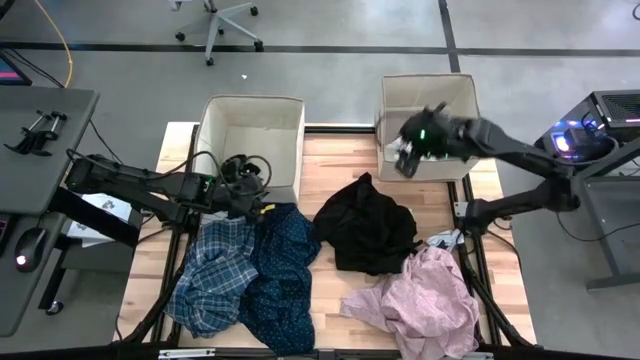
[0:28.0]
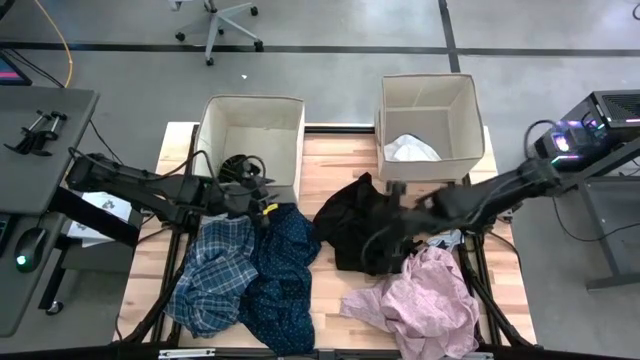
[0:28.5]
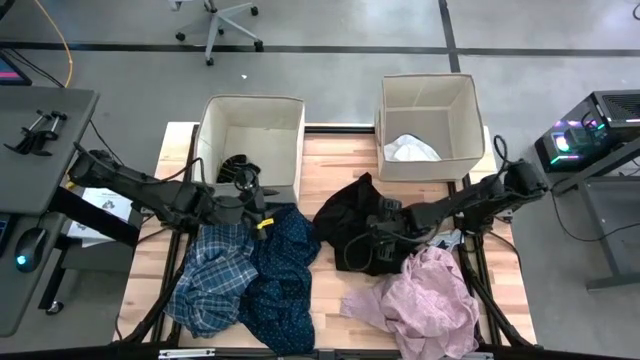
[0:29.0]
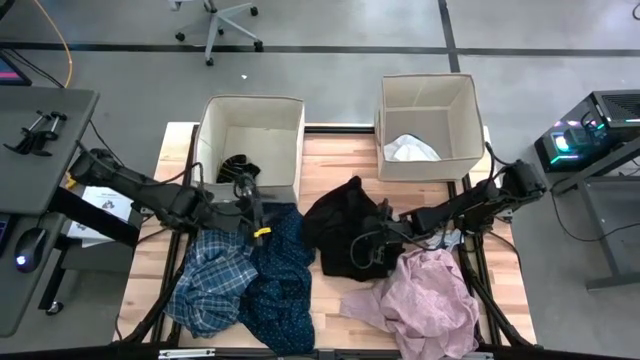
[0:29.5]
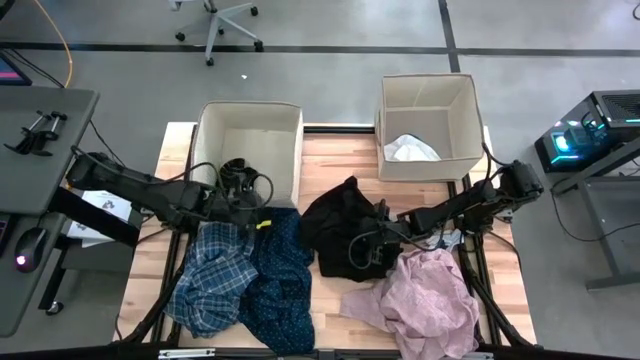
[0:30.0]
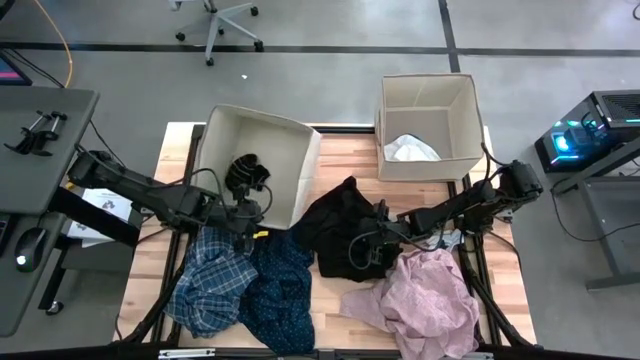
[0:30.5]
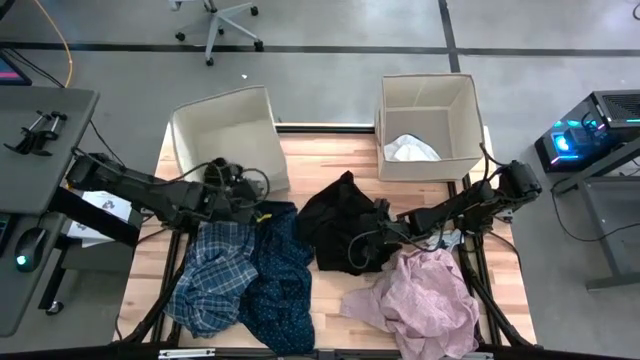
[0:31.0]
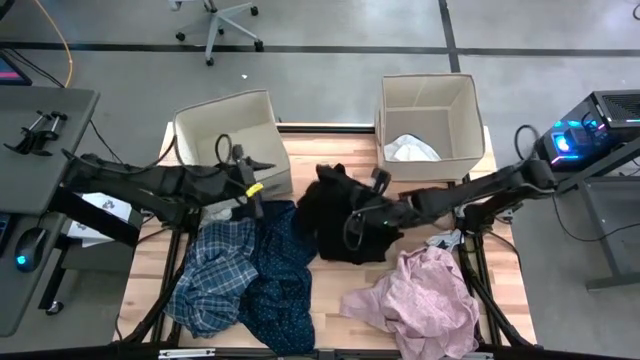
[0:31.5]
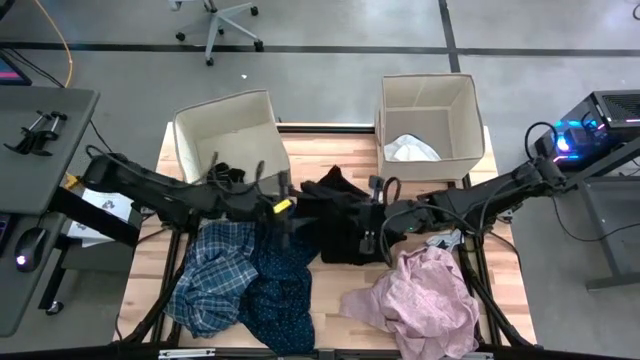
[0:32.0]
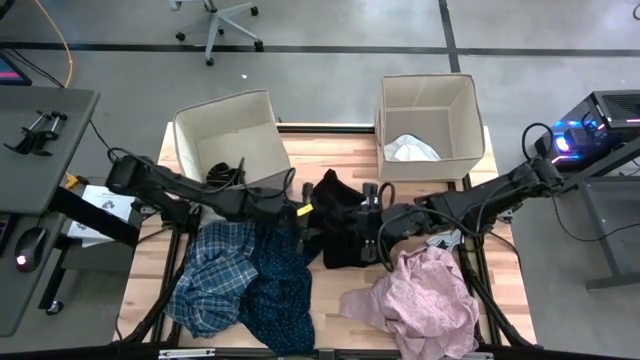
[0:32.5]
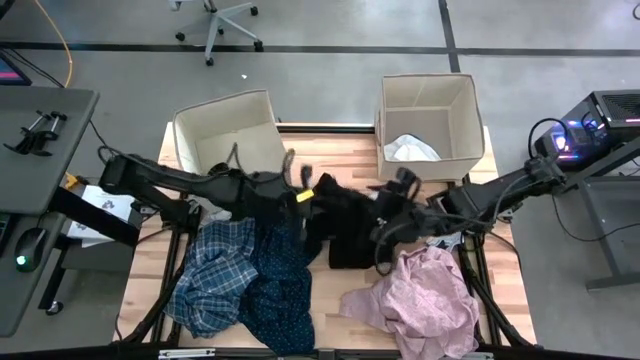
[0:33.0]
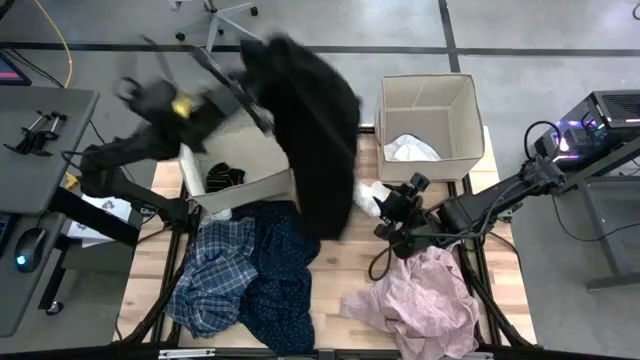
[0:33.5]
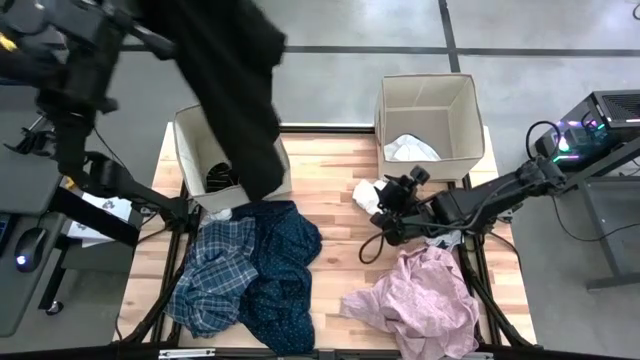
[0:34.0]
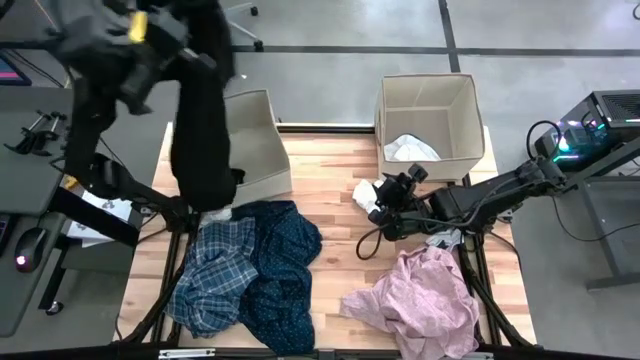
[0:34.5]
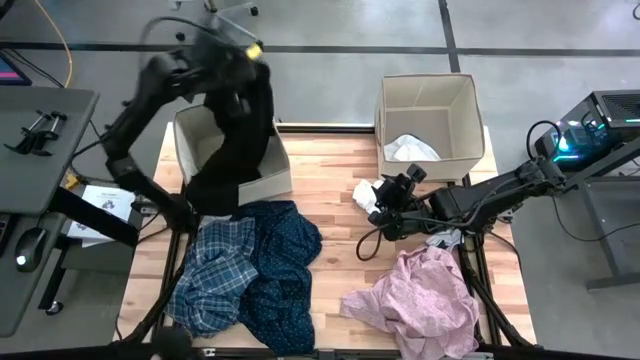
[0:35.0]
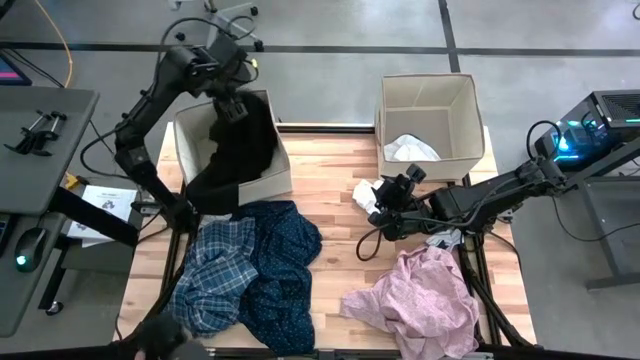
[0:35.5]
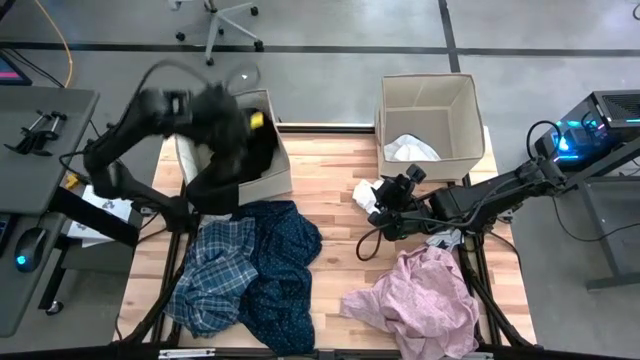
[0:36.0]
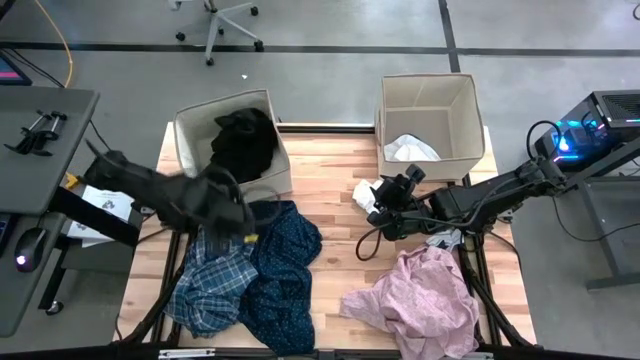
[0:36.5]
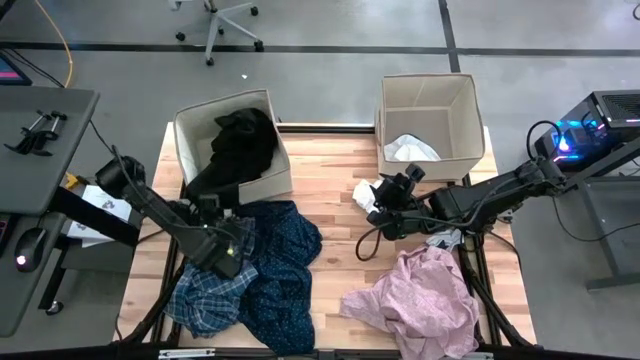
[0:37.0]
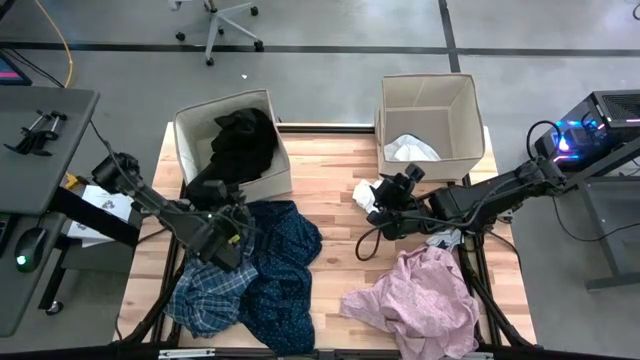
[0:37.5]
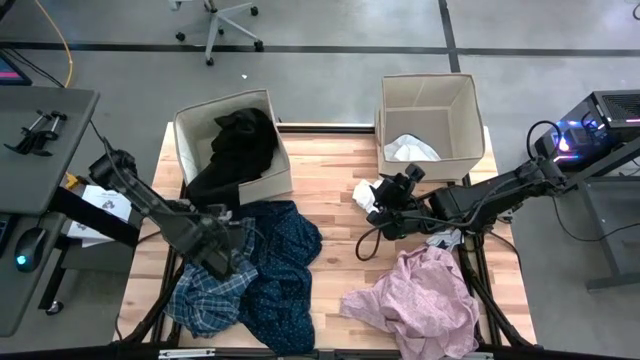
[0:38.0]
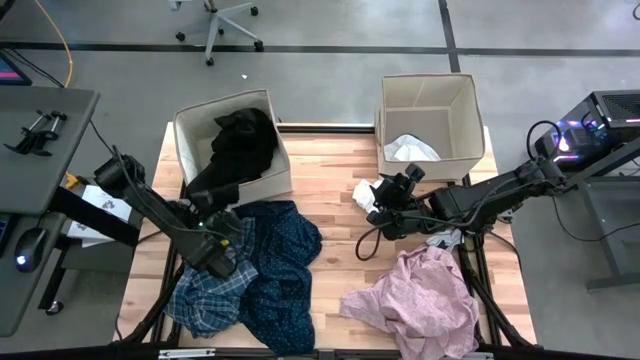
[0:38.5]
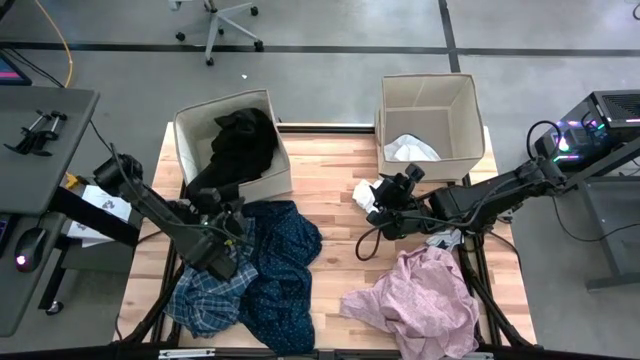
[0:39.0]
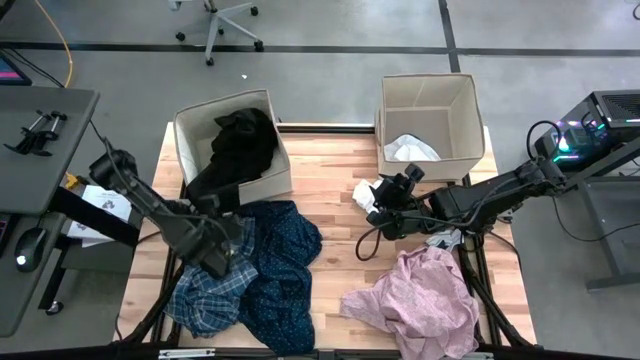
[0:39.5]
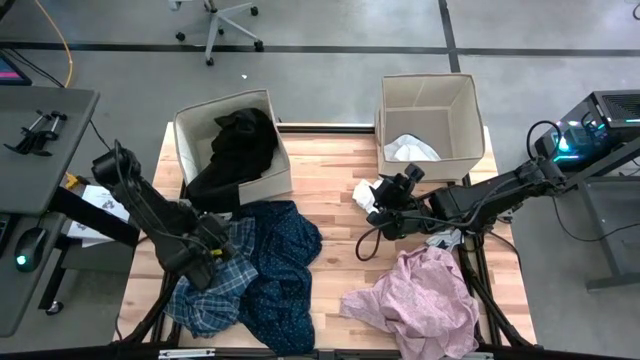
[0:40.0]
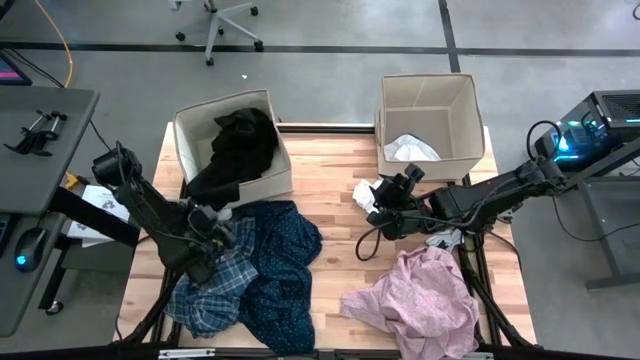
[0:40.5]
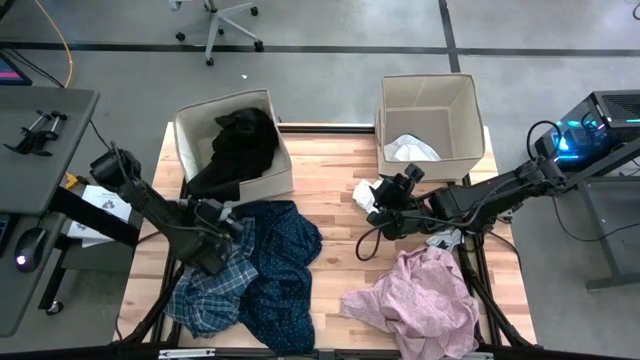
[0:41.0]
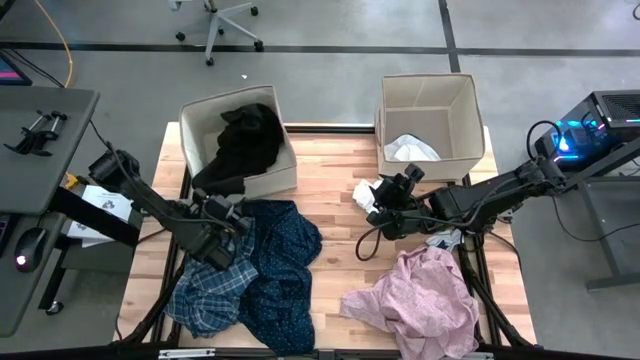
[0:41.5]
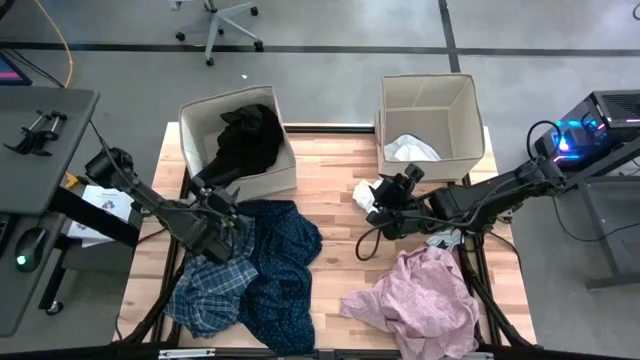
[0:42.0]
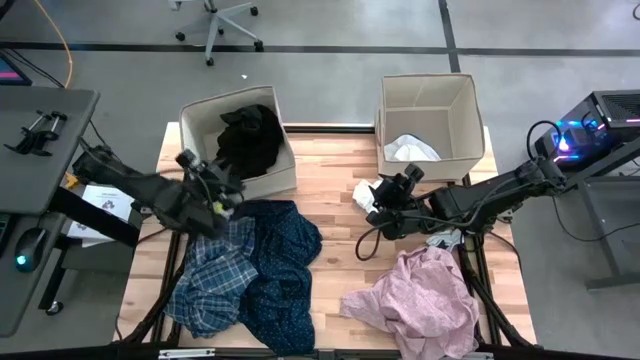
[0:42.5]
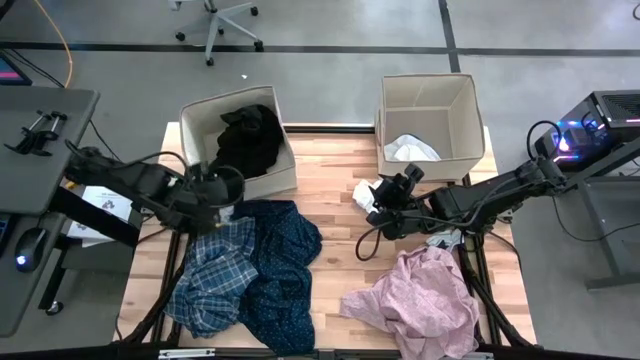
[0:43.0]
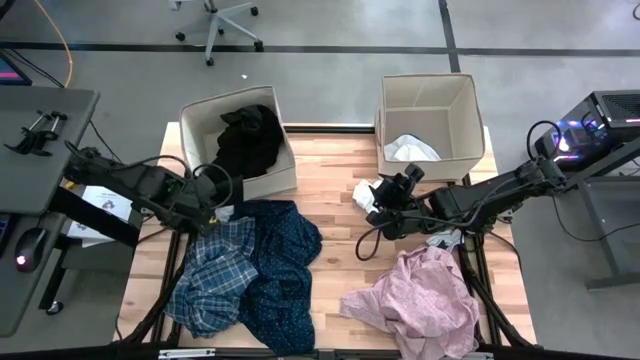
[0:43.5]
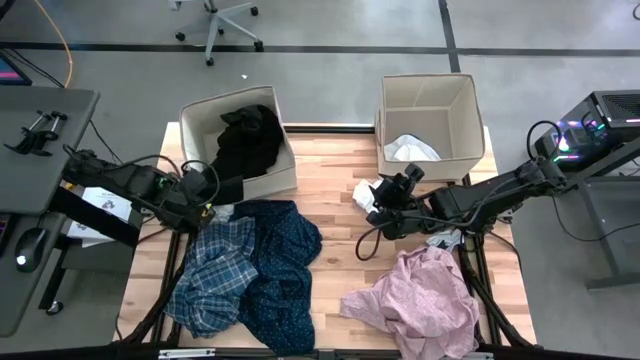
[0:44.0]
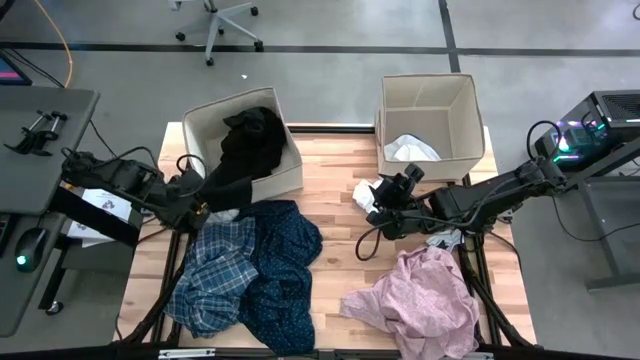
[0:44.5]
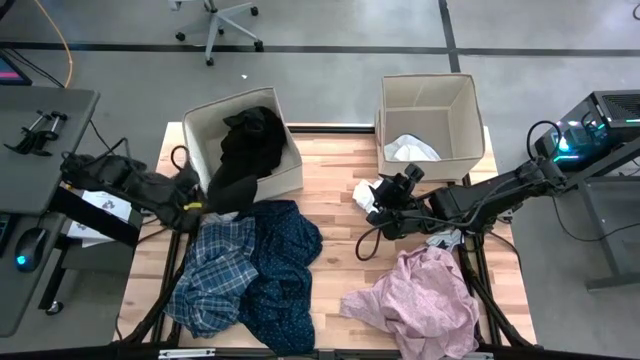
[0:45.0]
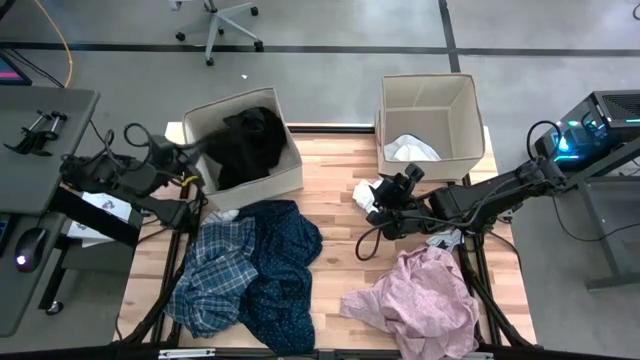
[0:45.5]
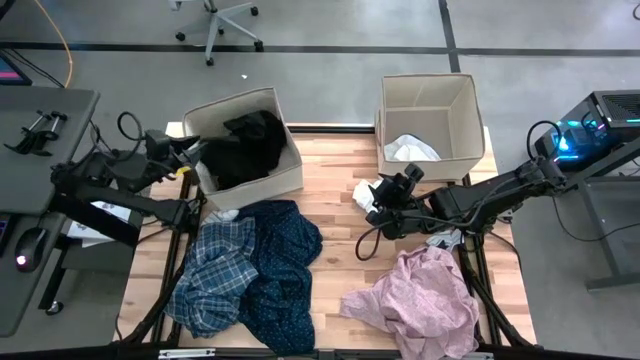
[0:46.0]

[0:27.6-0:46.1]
Task: Sort clothes
Put the black pants into the left laundry bin

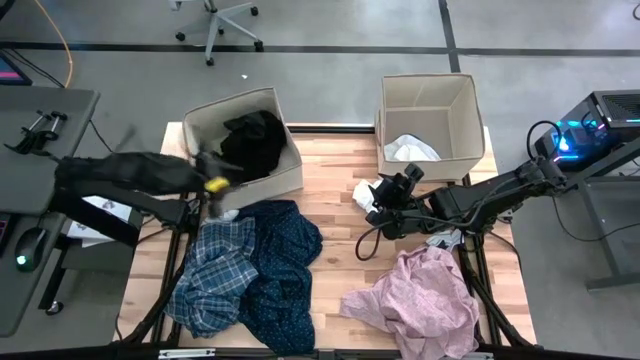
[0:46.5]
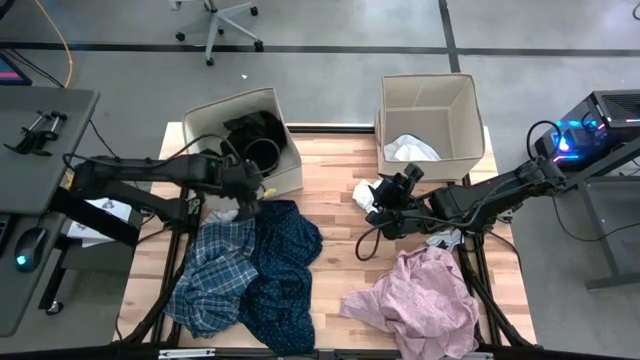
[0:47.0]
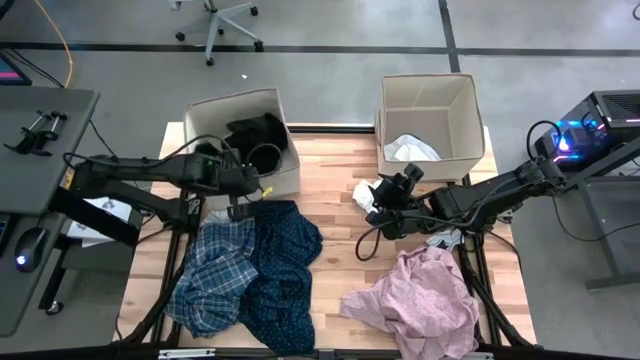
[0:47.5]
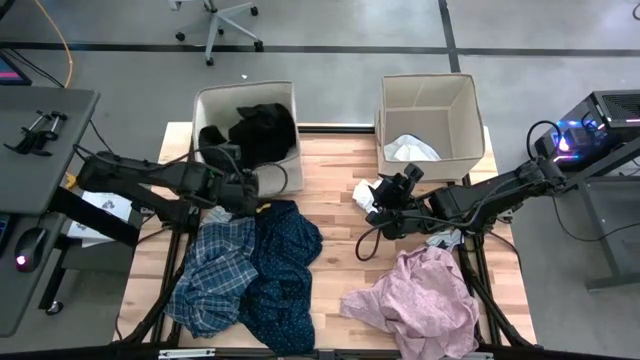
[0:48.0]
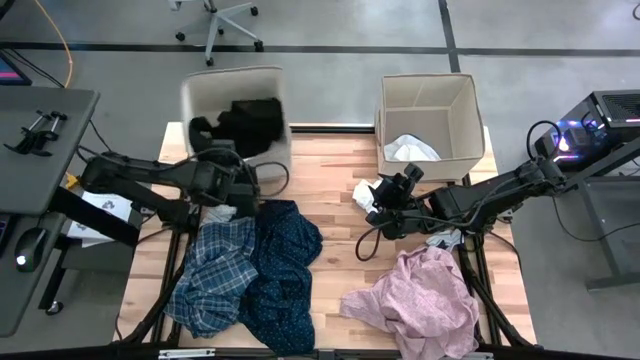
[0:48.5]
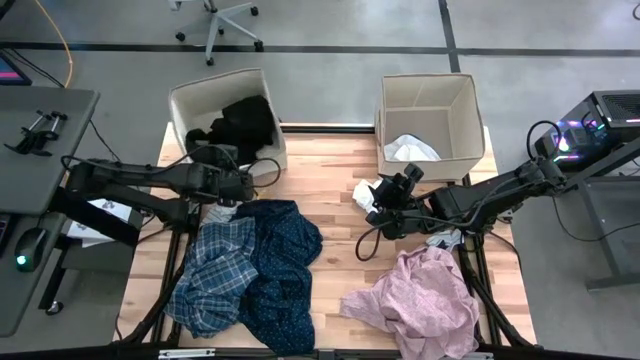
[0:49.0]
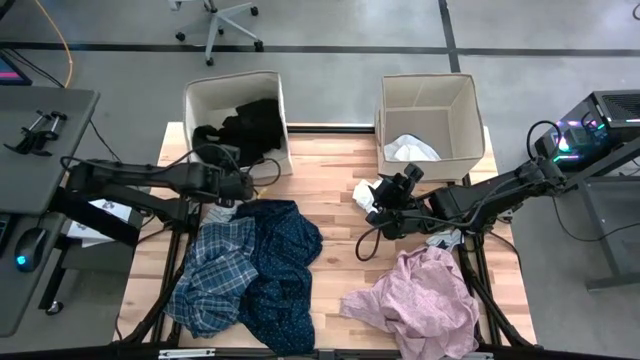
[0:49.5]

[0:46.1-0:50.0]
Adjust the left laundry bin

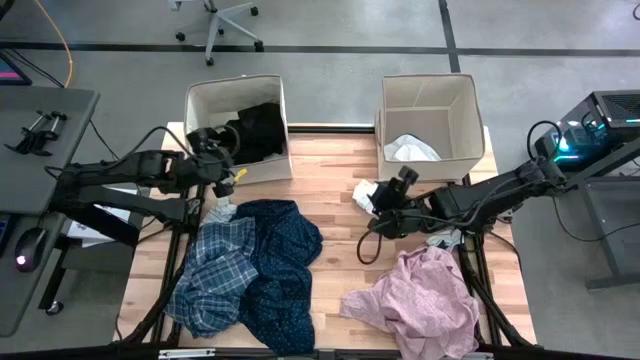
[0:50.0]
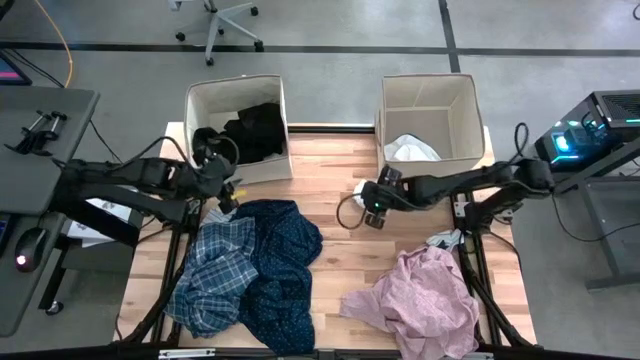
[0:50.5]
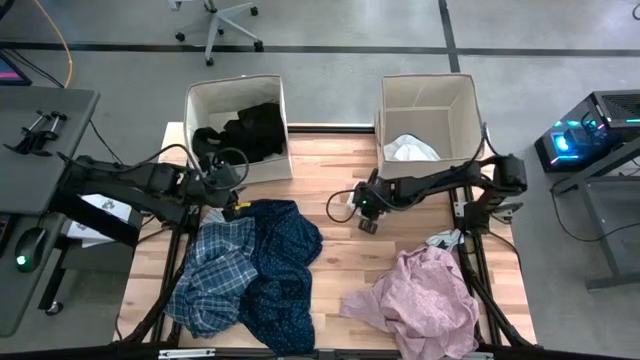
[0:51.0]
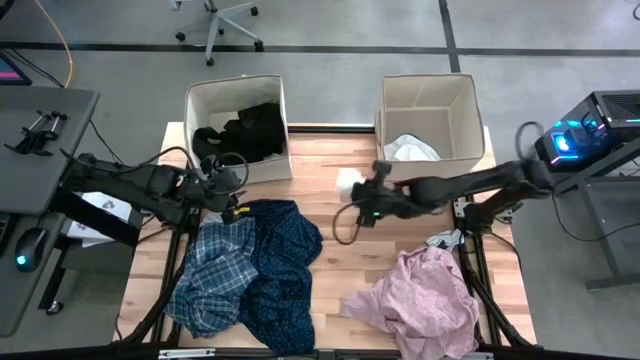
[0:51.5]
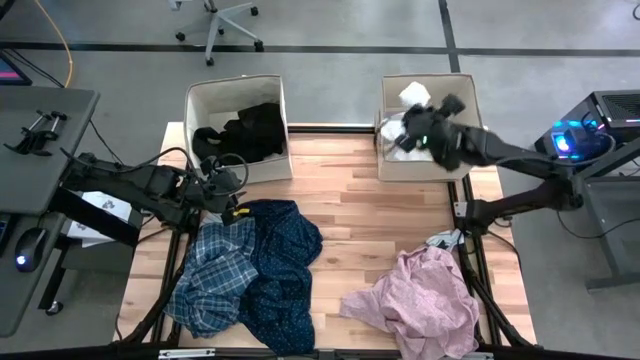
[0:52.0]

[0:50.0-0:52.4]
Put the pair of white socks into the right laundry bin
